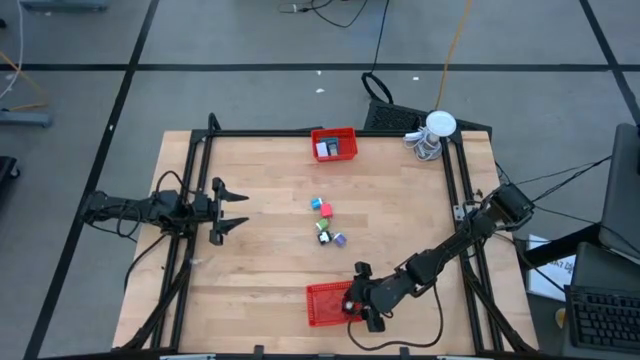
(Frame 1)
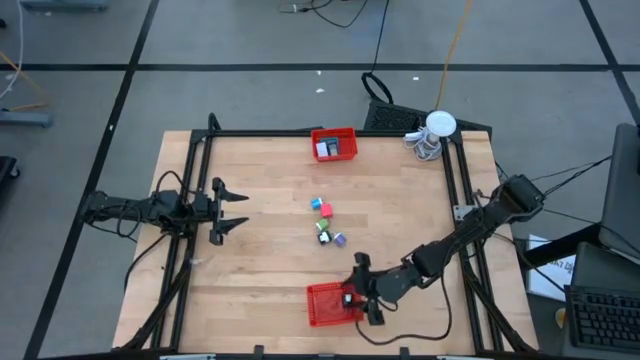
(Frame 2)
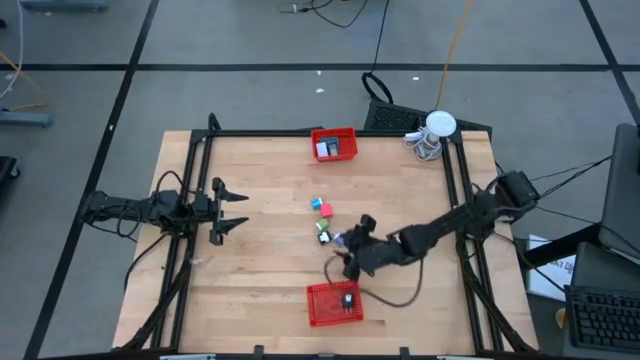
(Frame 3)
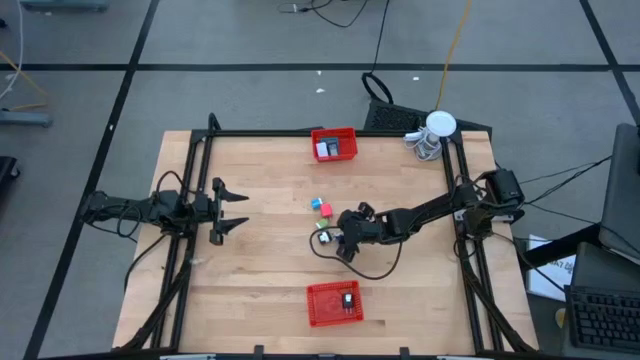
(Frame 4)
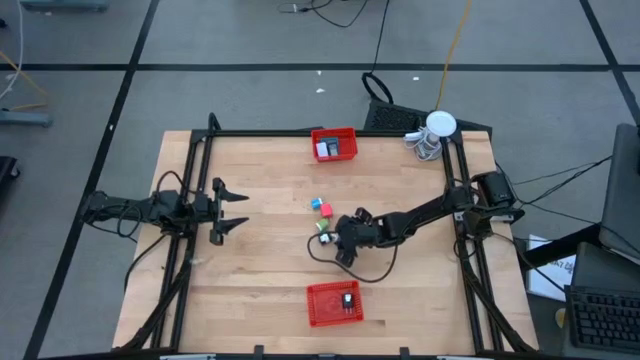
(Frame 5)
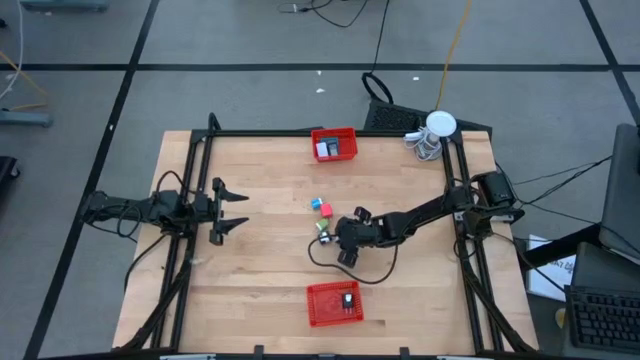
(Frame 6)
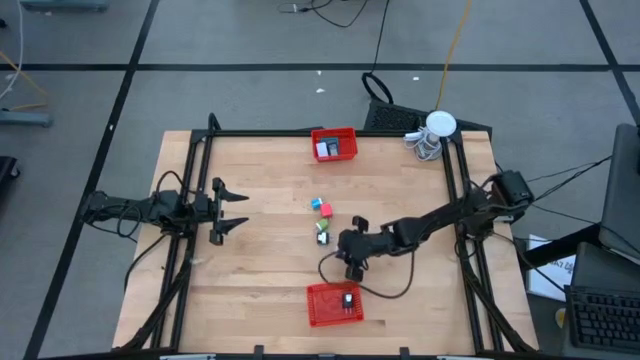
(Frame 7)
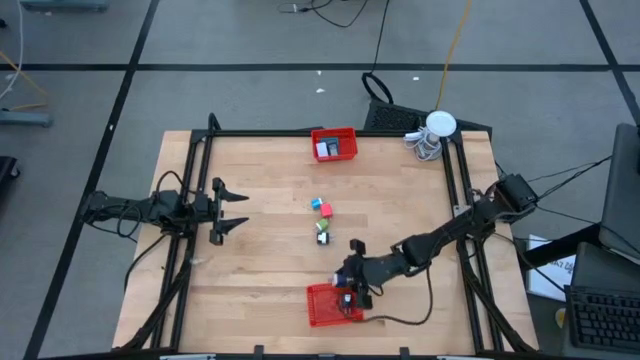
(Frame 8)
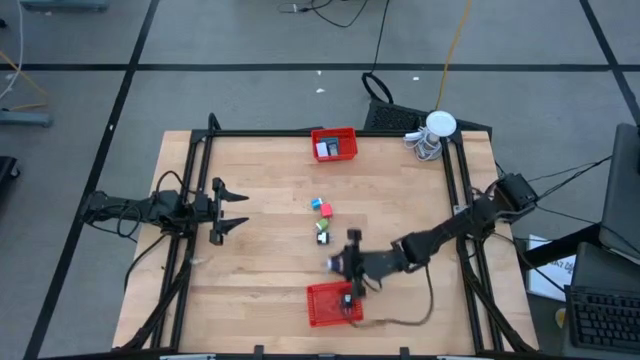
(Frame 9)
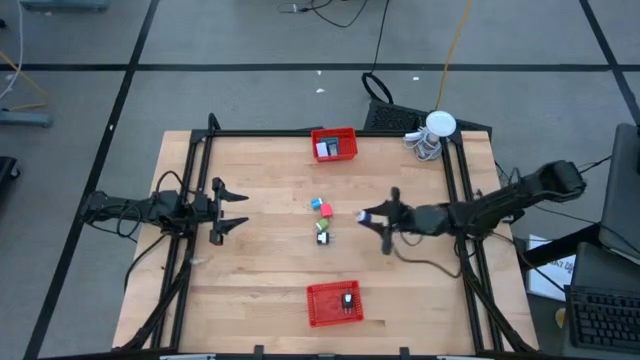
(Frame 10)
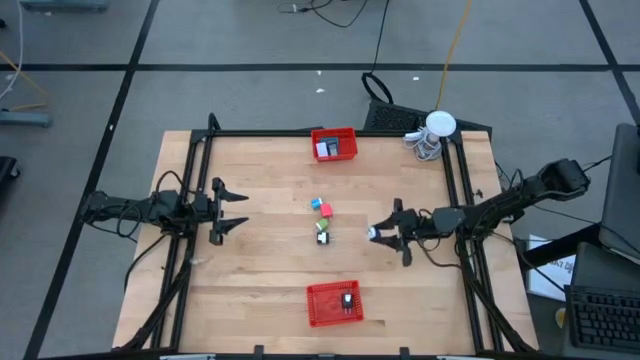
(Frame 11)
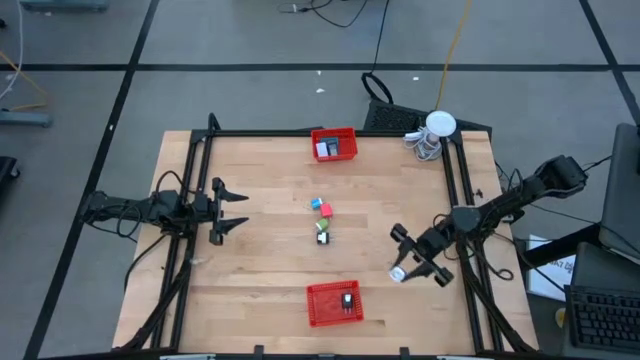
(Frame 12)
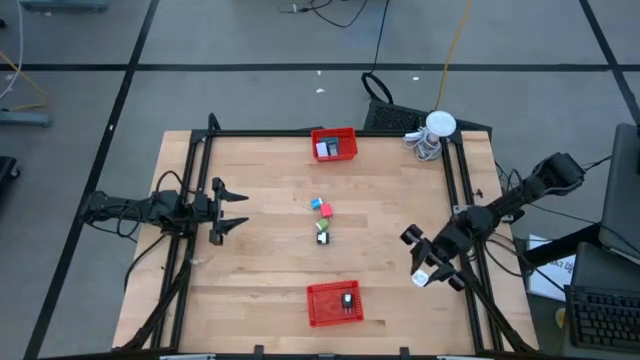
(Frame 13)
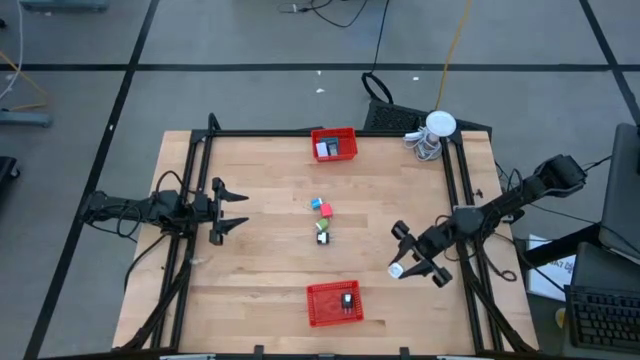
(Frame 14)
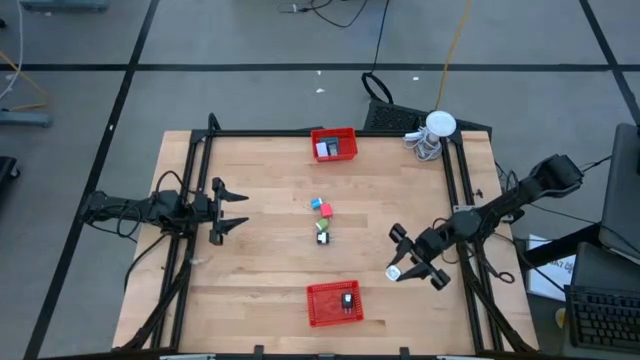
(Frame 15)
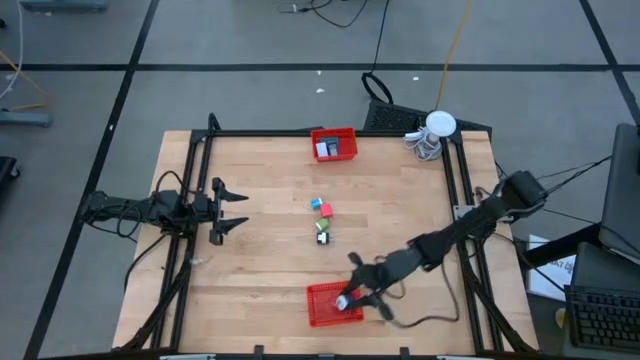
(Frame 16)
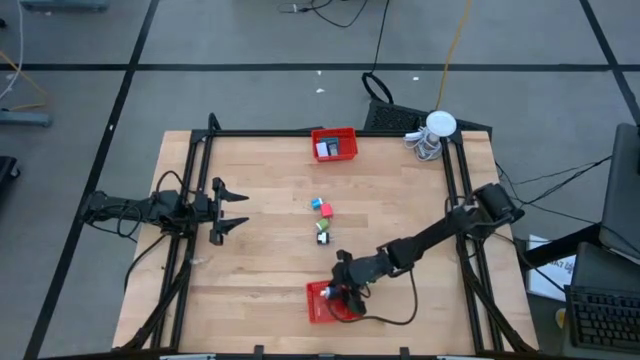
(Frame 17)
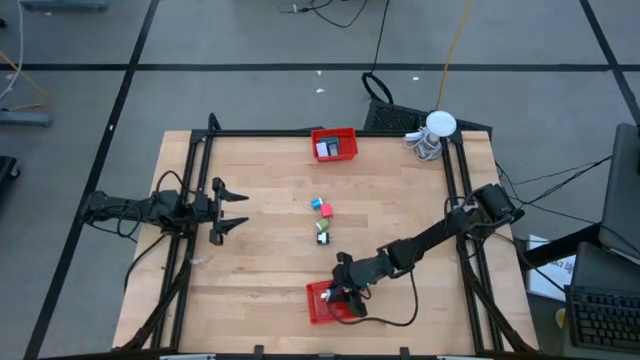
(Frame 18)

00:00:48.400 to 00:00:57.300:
Task: Pick & Place Office items
Put the purple charger adapter into the bottom orange bin

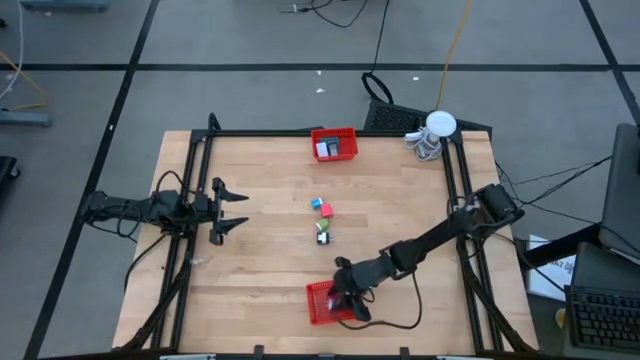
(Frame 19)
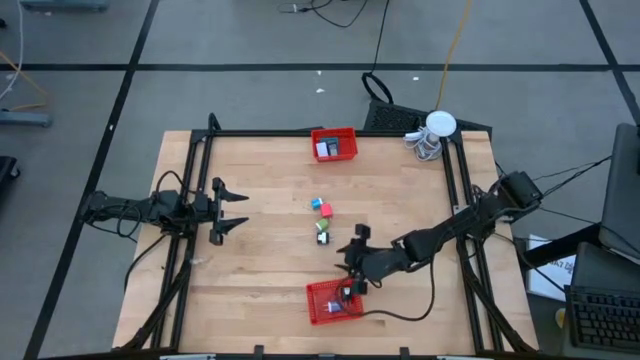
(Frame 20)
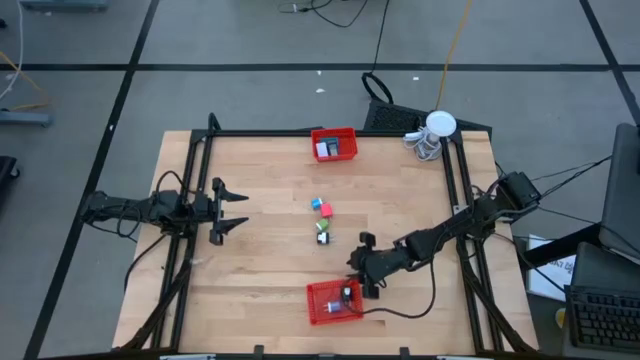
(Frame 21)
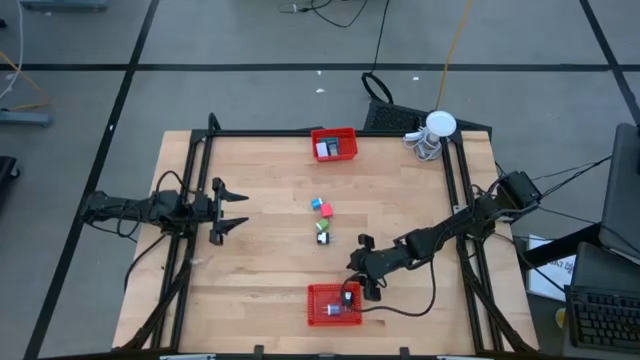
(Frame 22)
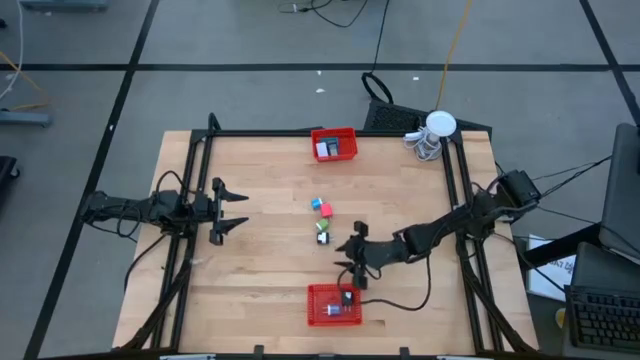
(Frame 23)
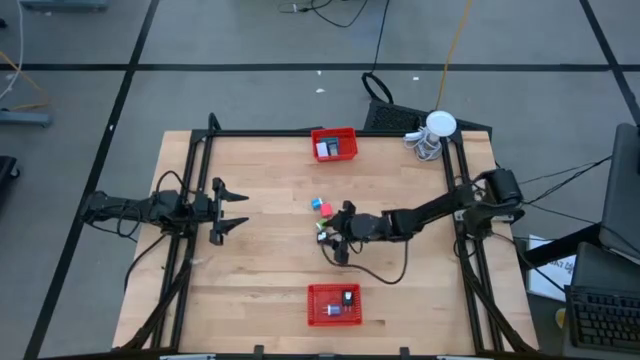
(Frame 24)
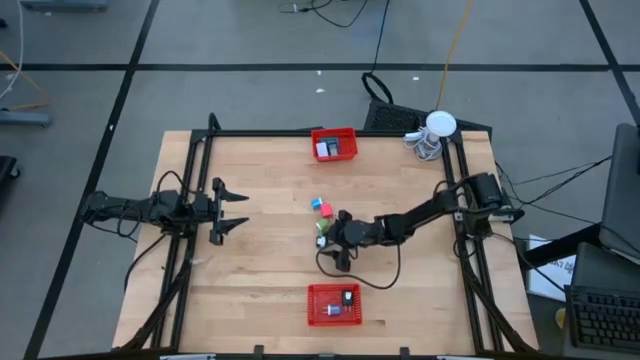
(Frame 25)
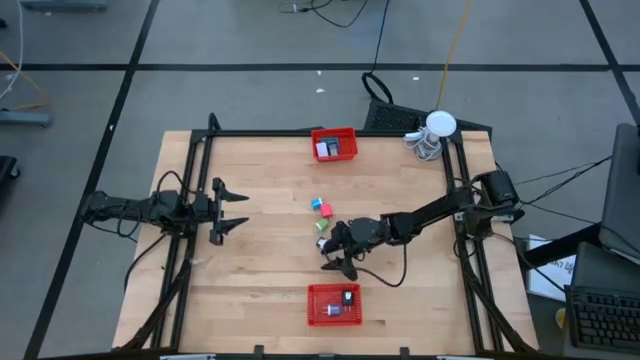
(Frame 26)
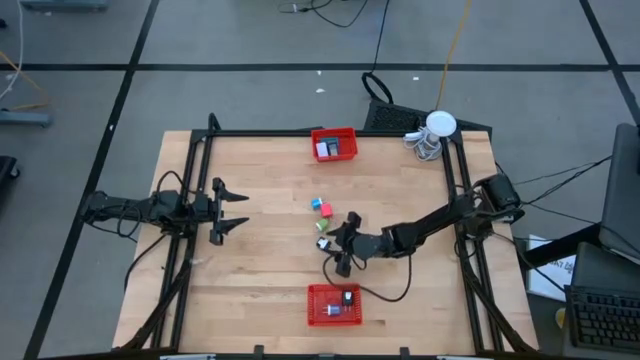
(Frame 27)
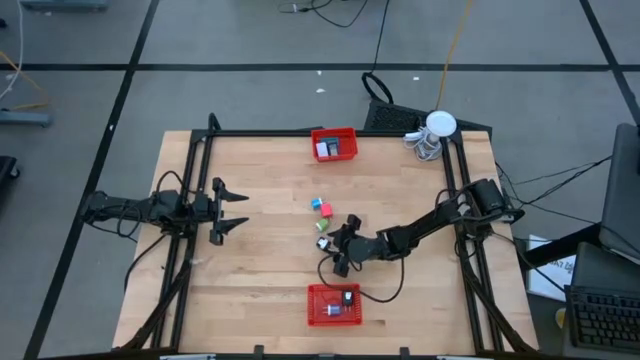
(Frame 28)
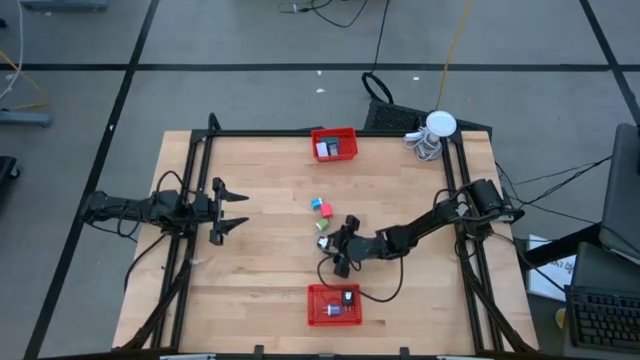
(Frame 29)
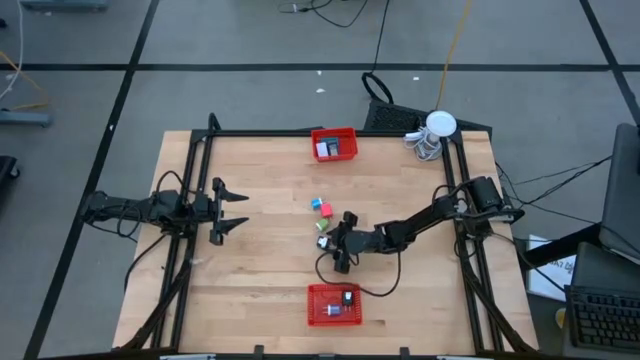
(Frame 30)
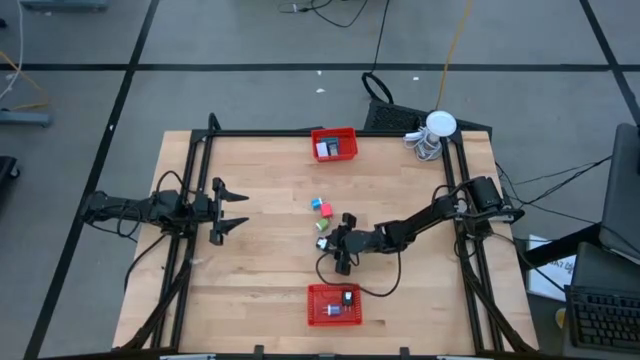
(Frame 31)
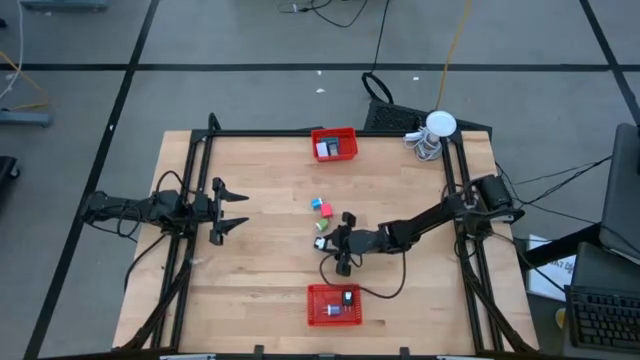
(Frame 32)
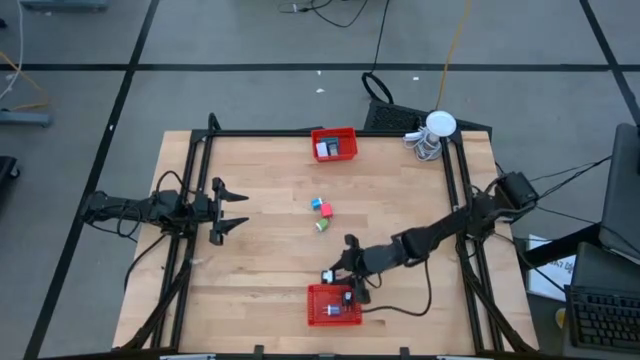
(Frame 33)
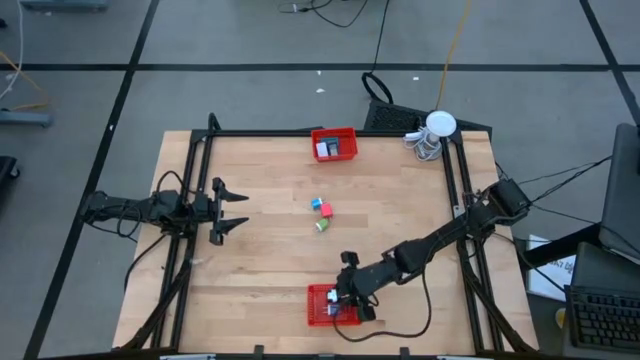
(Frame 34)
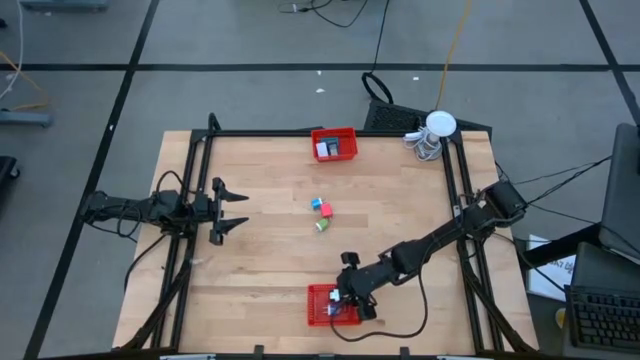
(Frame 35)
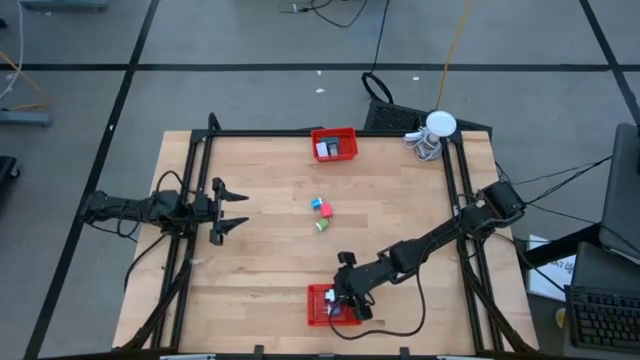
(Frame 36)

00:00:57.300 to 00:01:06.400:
Put the black white charger adapter into the bottom orange bin

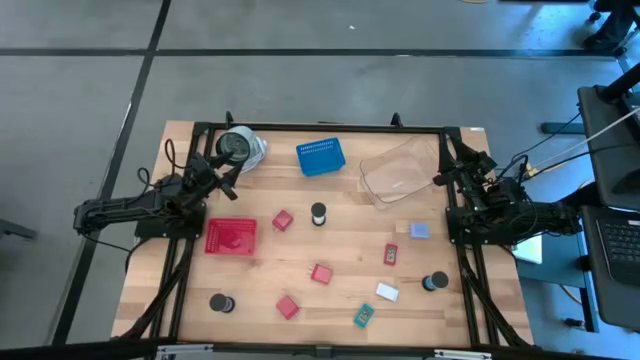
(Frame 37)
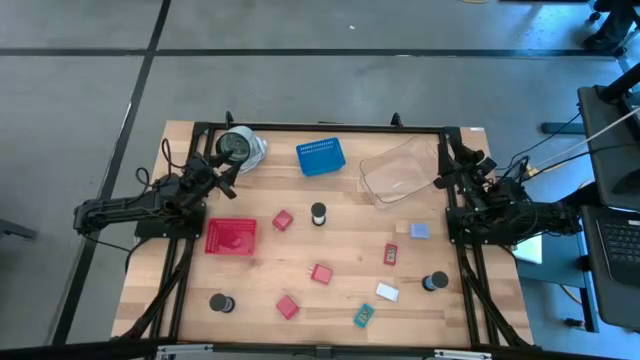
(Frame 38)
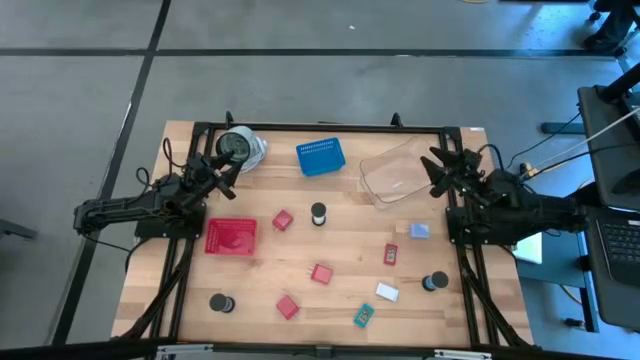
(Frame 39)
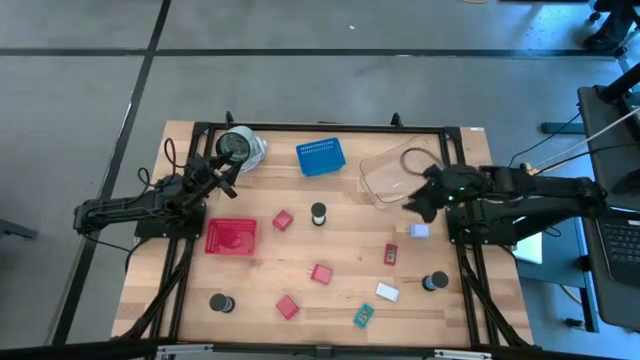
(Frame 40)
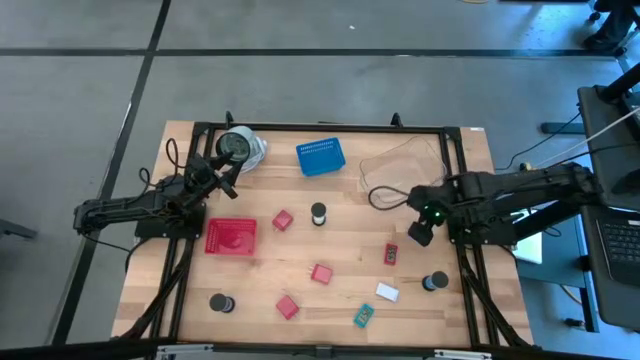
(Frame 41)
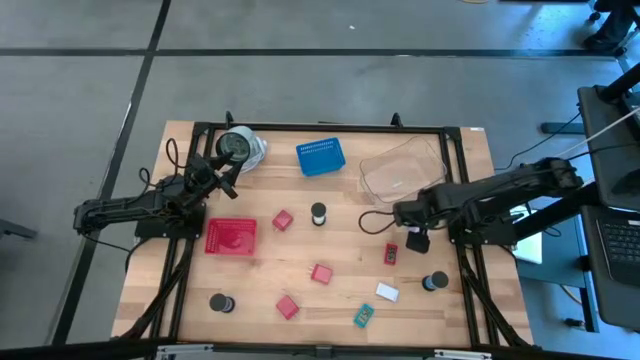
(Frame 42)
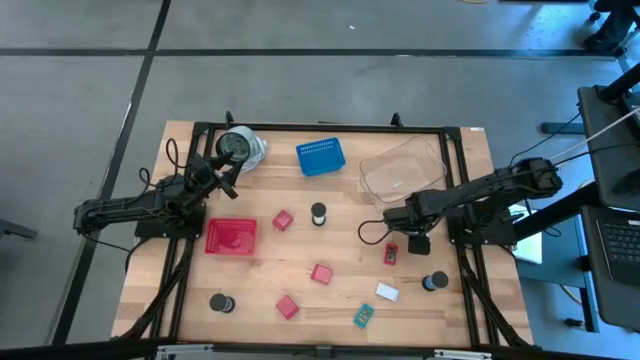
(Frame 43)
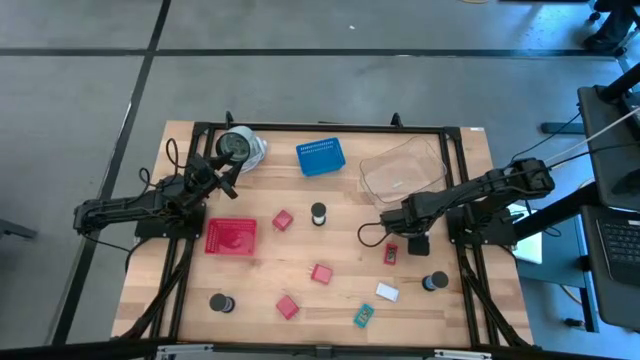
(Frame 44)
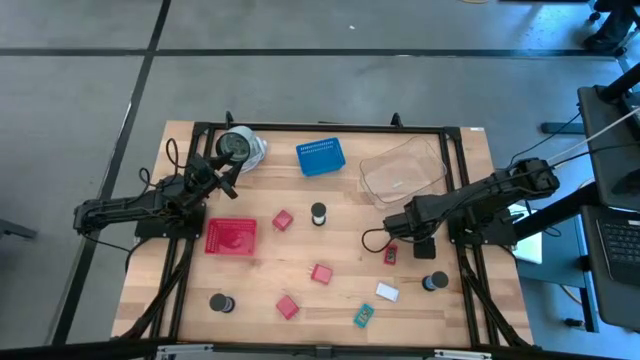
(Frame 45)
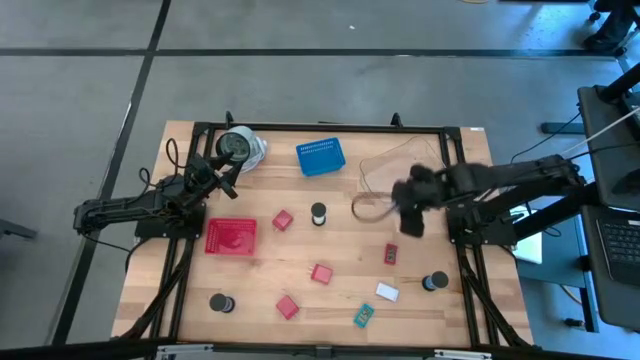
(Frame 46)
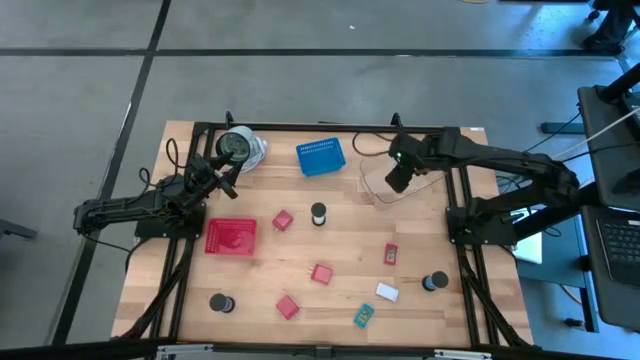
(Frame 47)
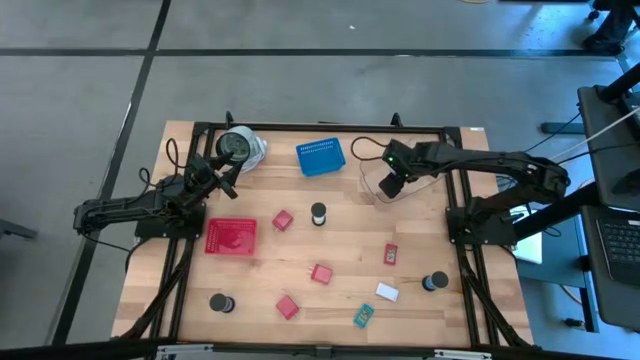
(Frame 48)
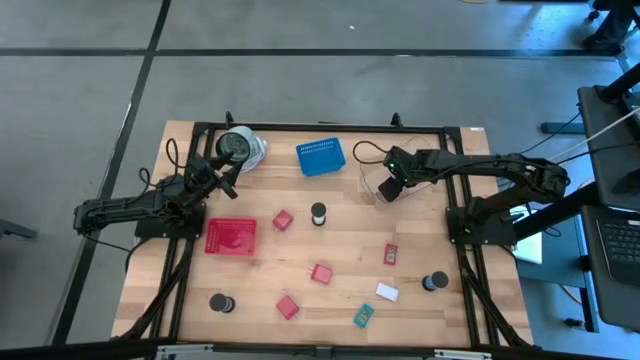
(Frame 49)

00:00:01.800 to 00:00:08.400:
Task: Pick & Place Office items
Put the light blue charger adapter into the transparent bin
